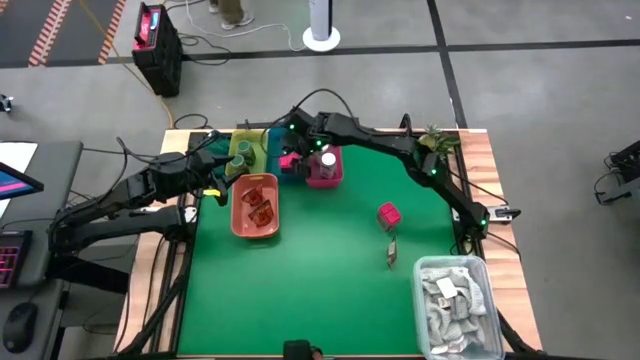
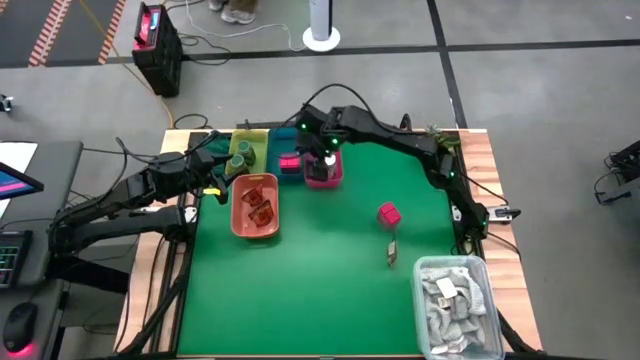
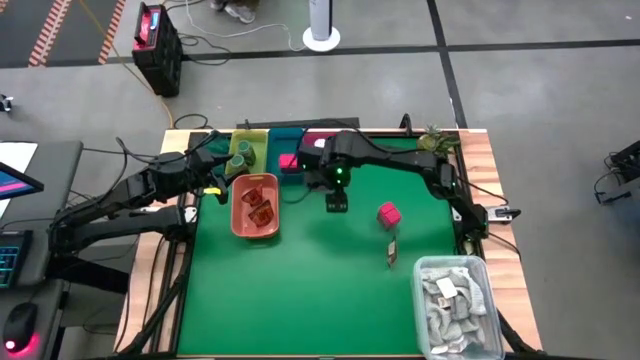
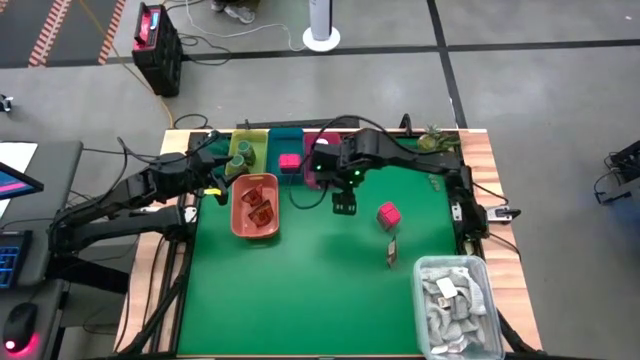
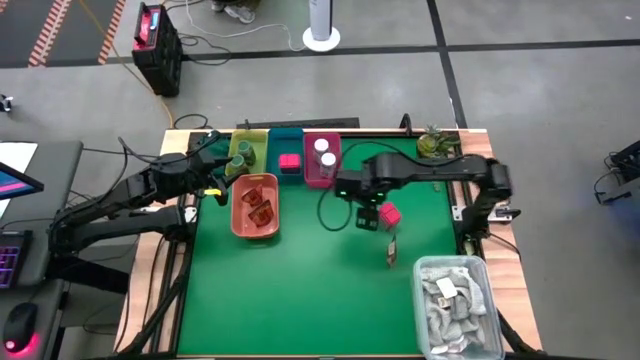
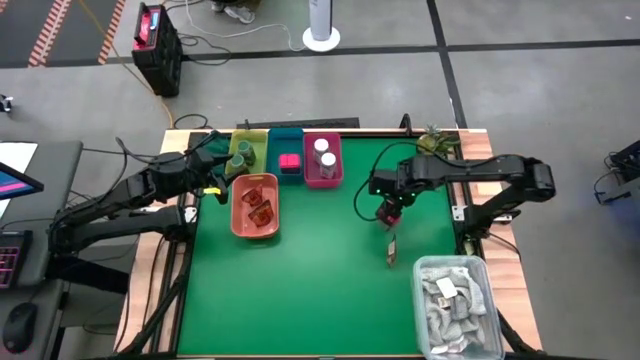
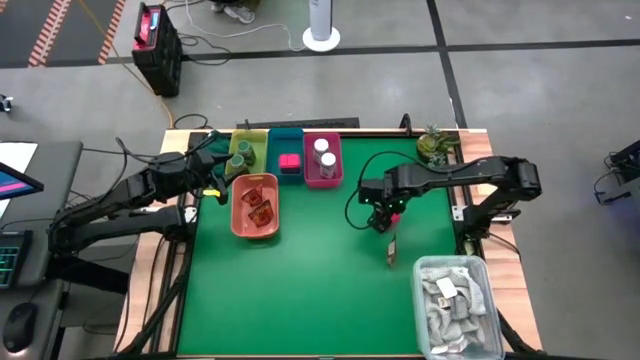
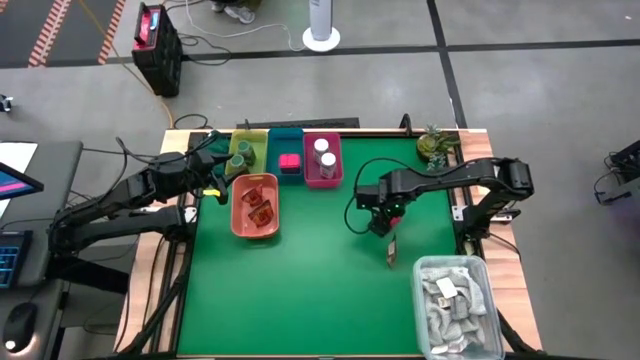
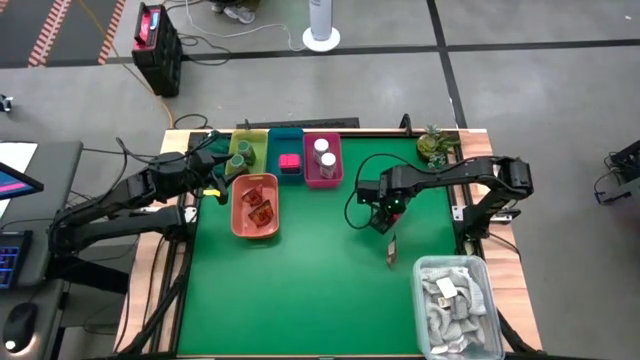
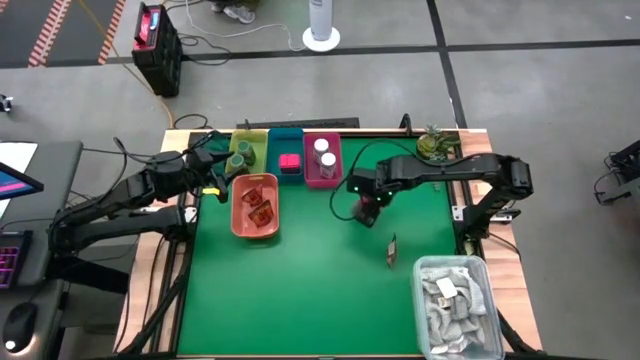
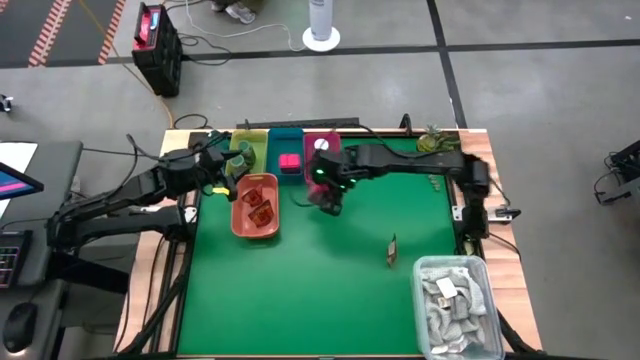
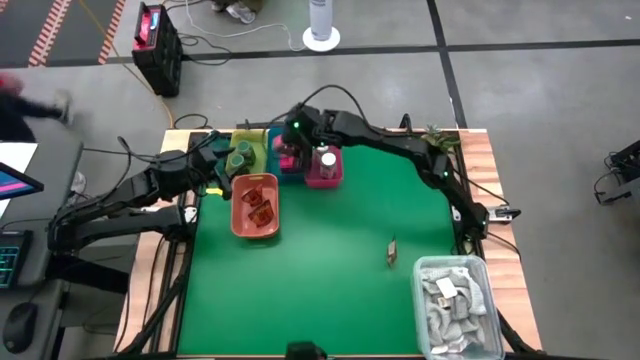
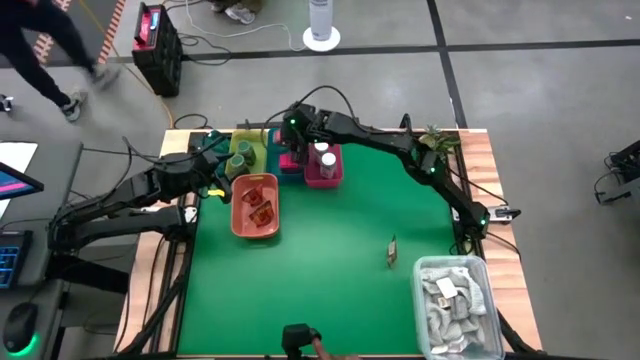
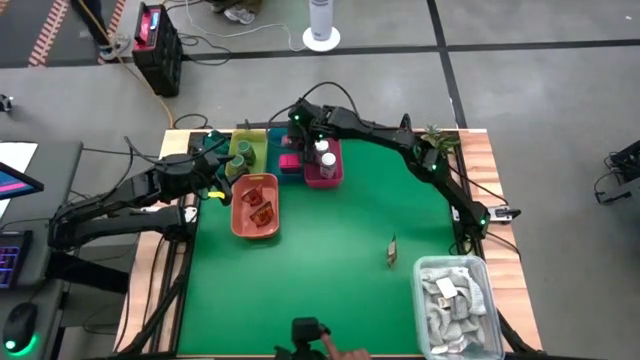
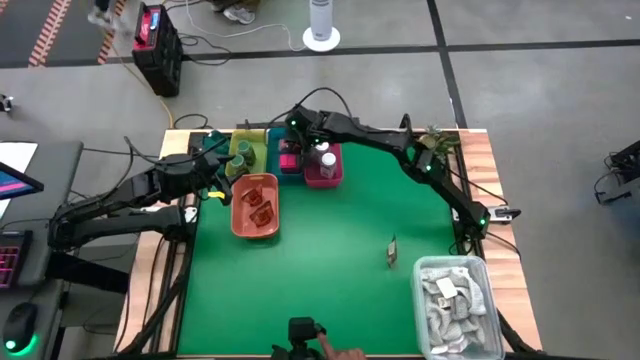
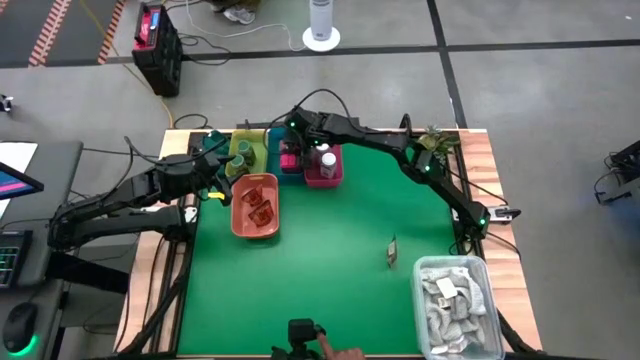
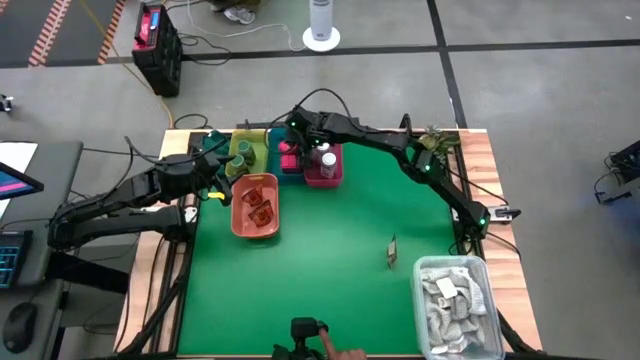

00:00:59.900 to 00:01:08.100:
Task: Sort spices by type
Put the red seasoning can into the blue bin

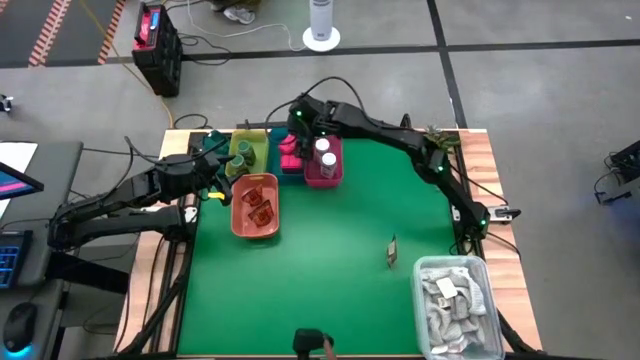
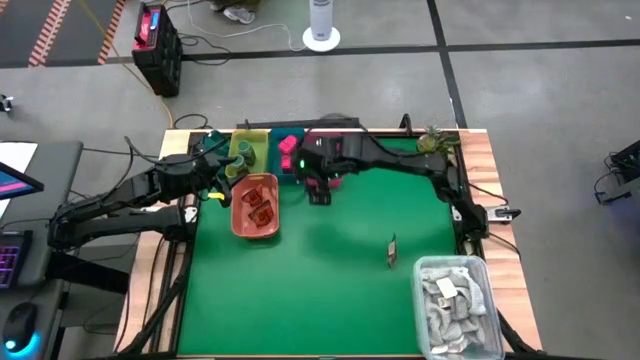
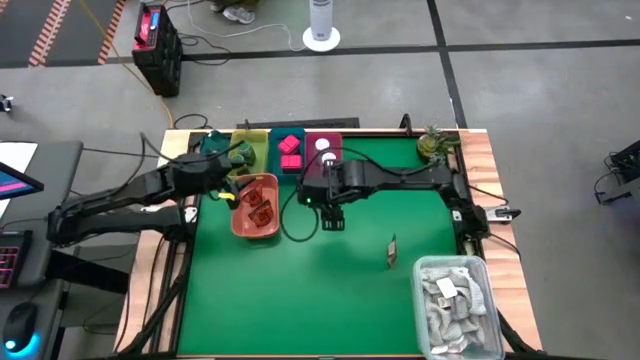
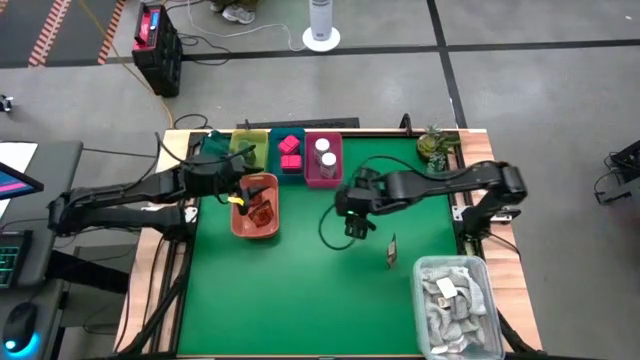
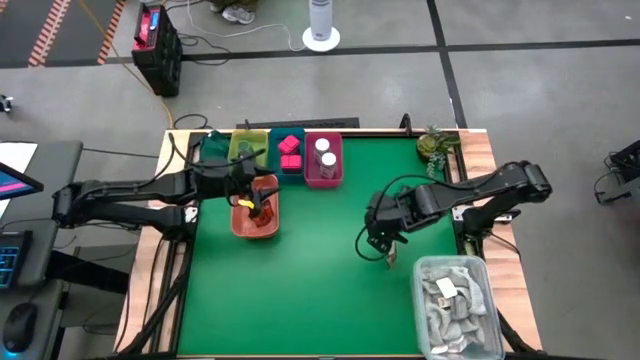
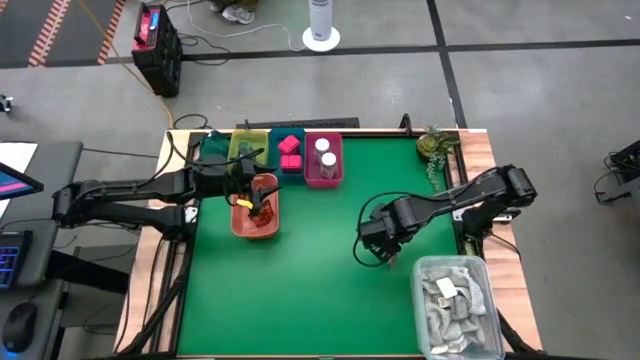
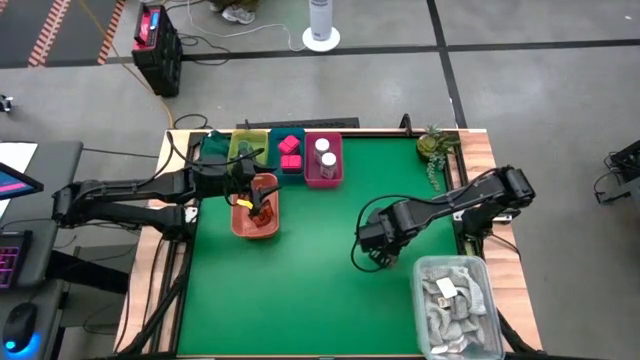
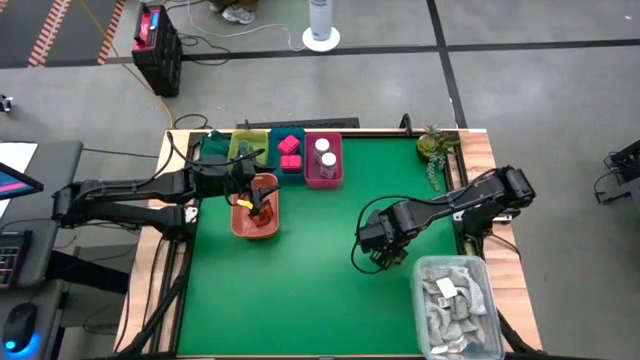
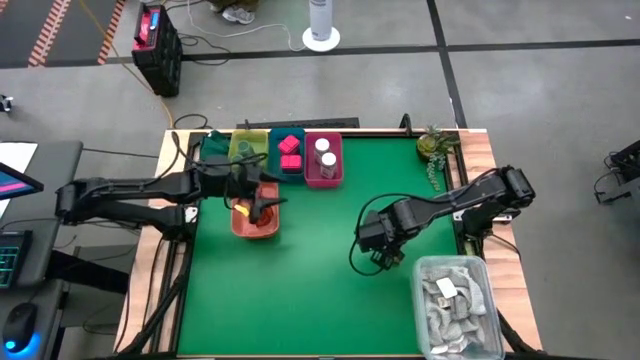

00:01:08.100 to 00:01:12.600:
Put the orange seasoning pack into the orange bin

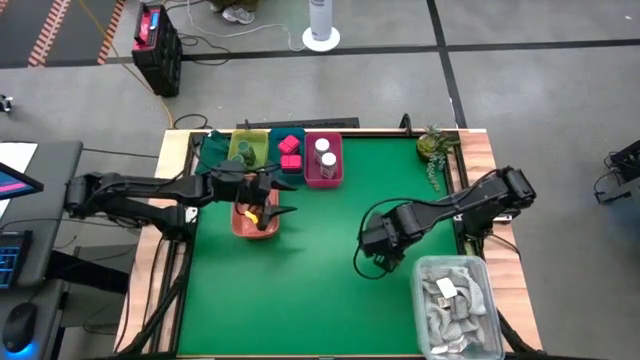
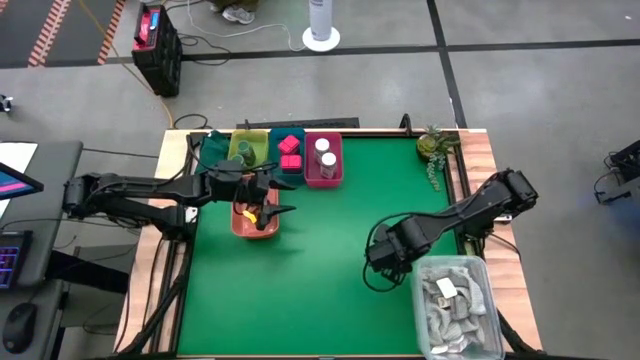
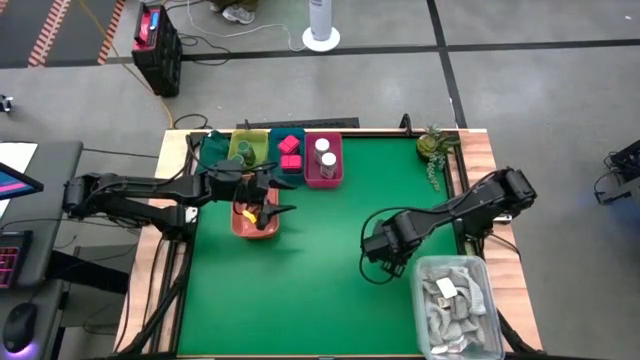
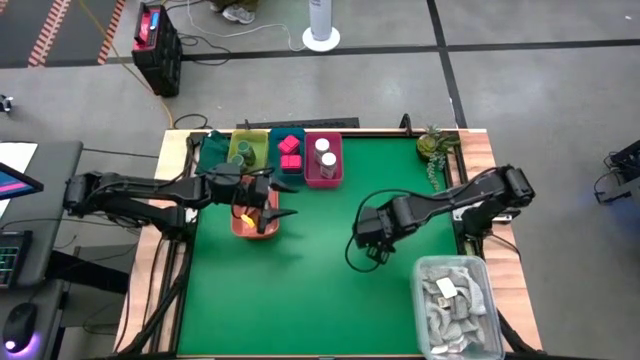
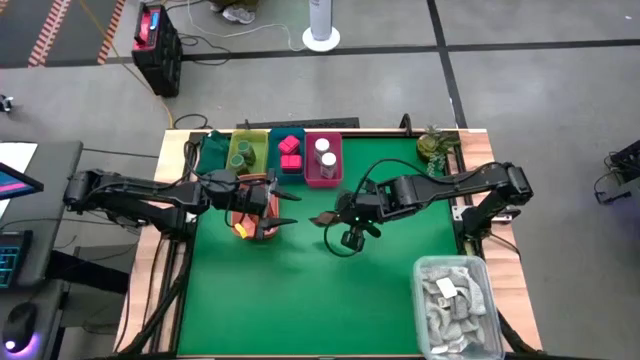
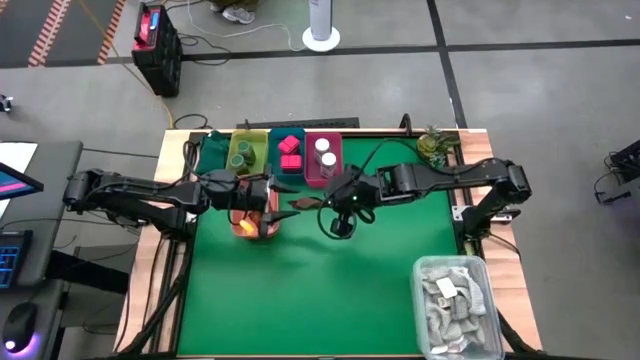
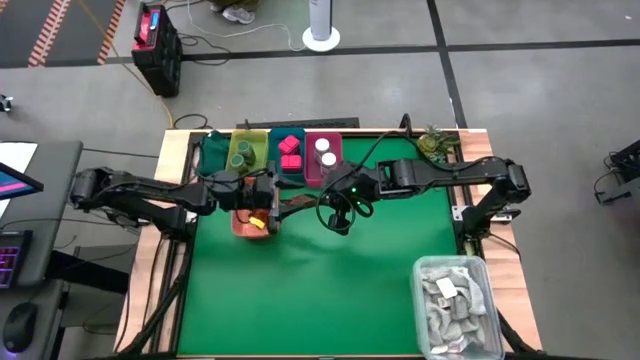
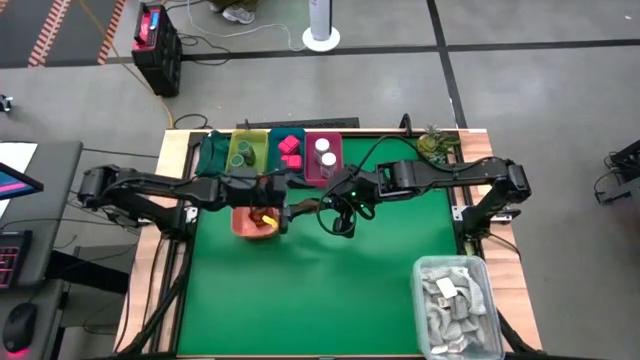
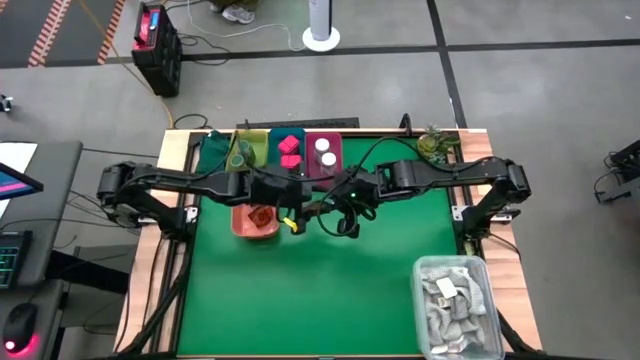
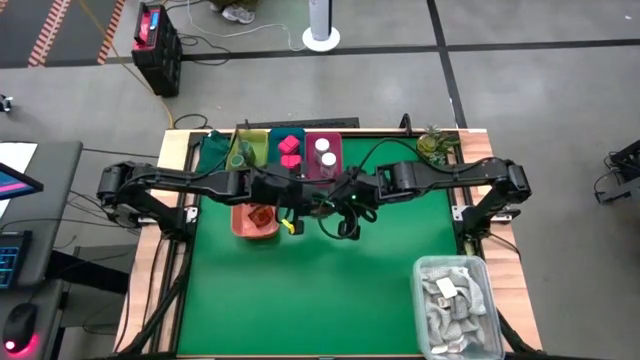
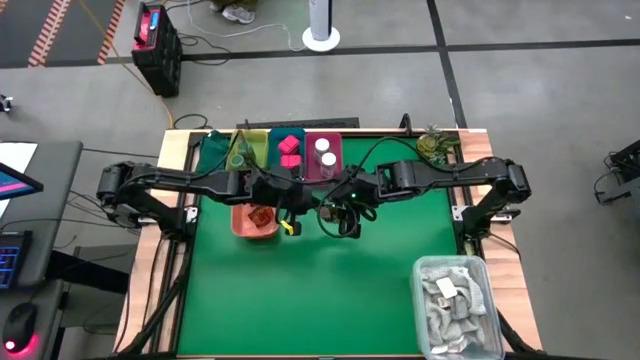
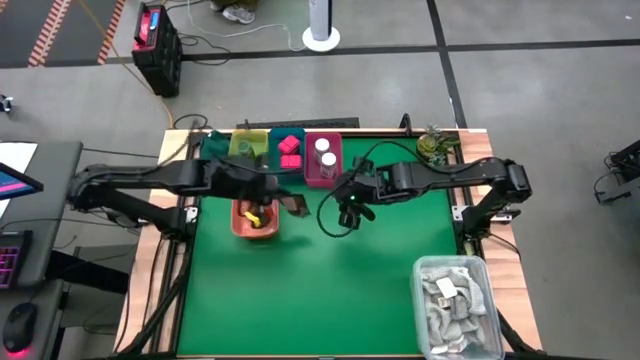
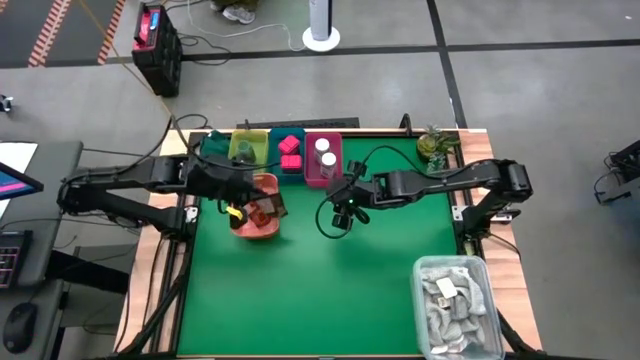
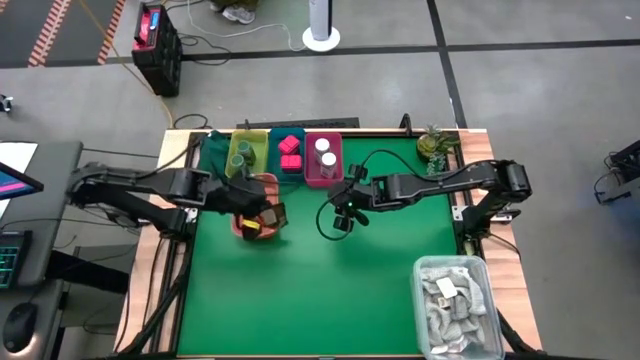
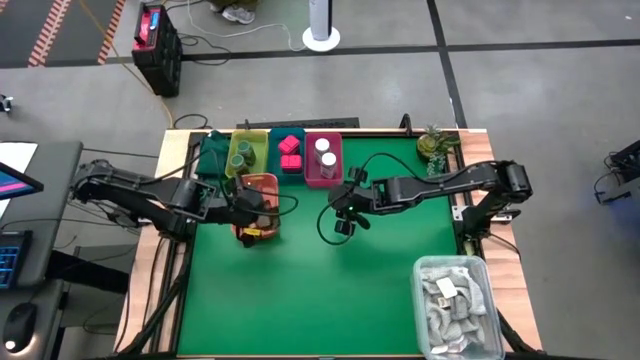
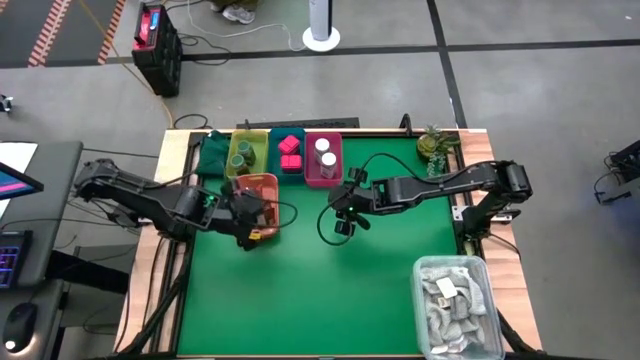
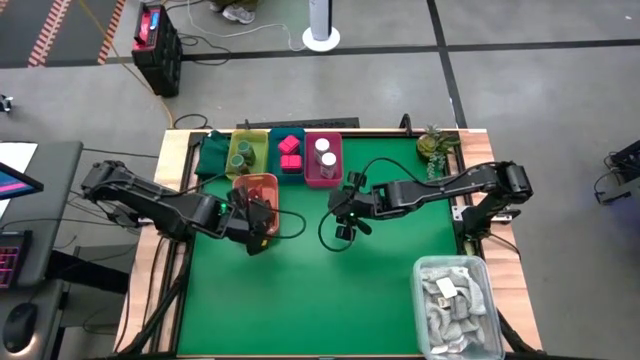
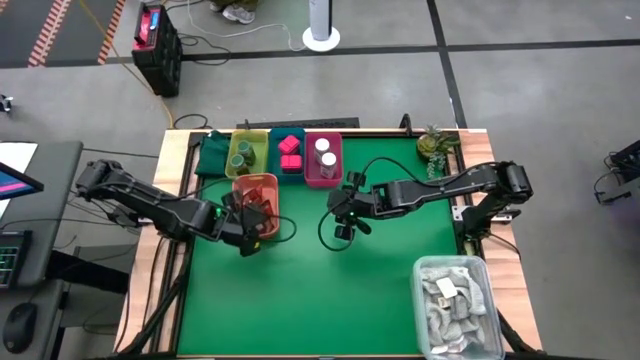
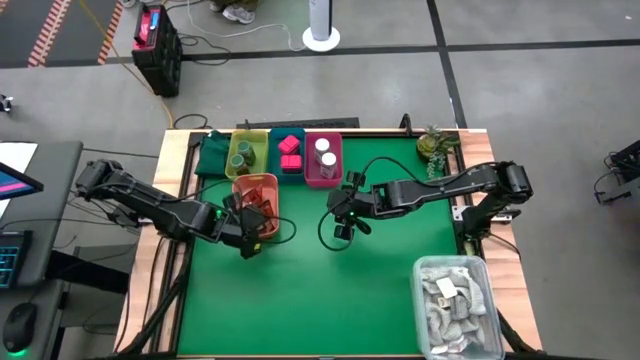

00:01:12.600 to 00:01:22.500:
Put the orange seasoning pack into the orange bin
